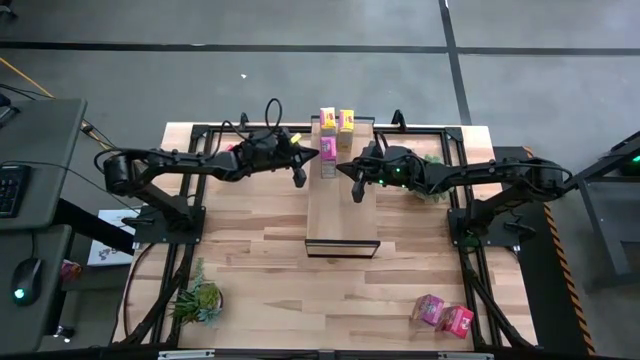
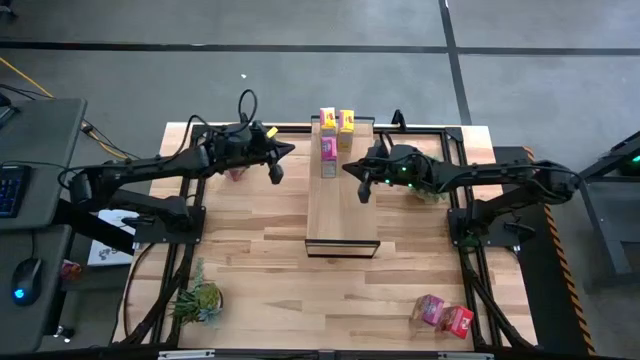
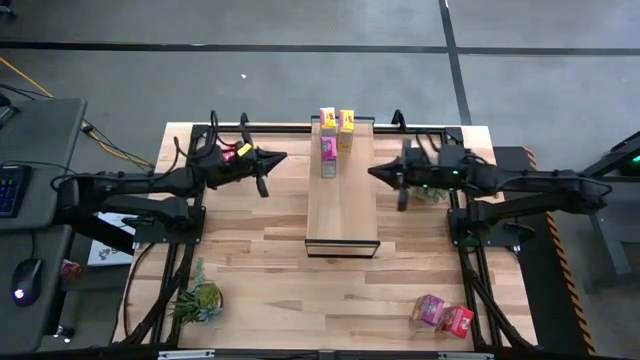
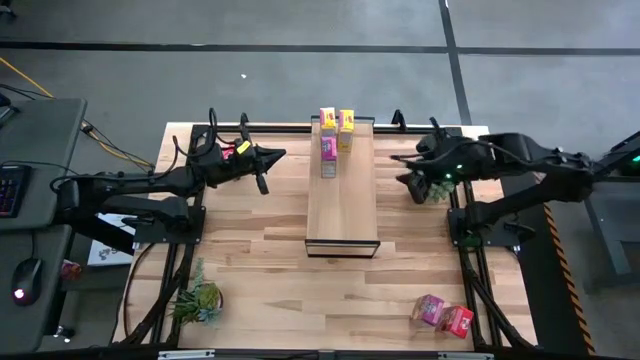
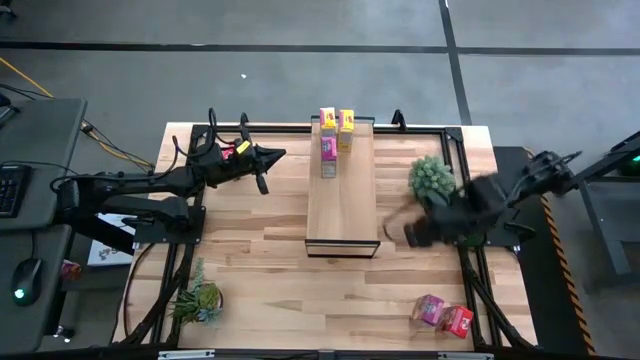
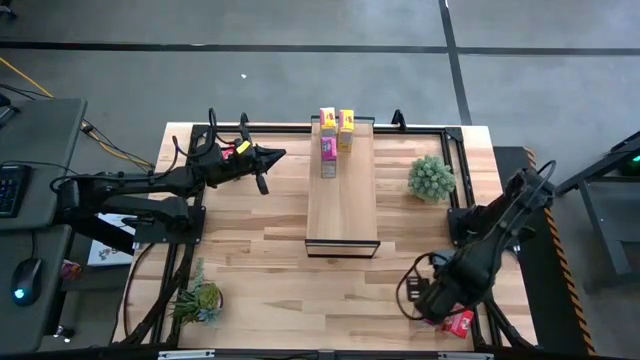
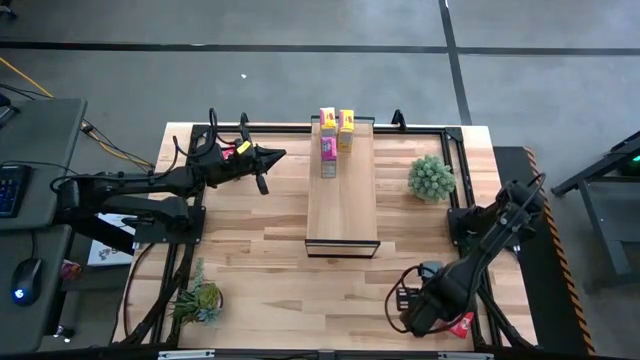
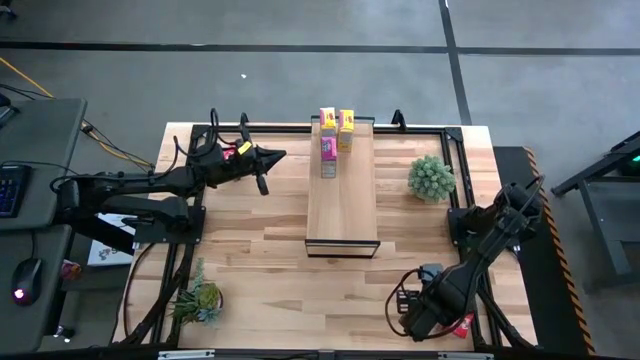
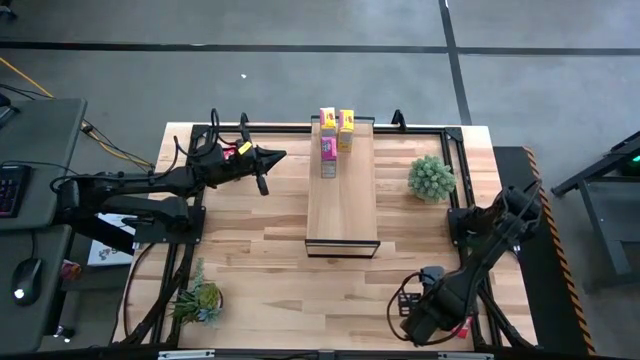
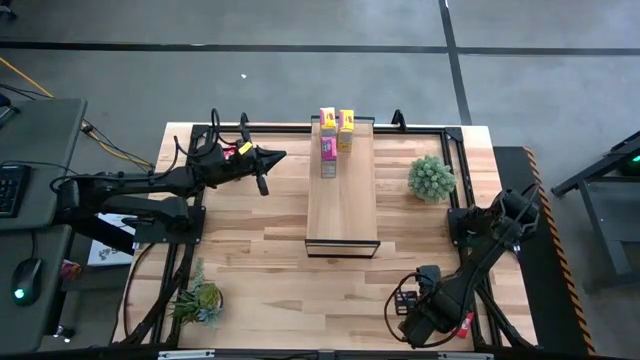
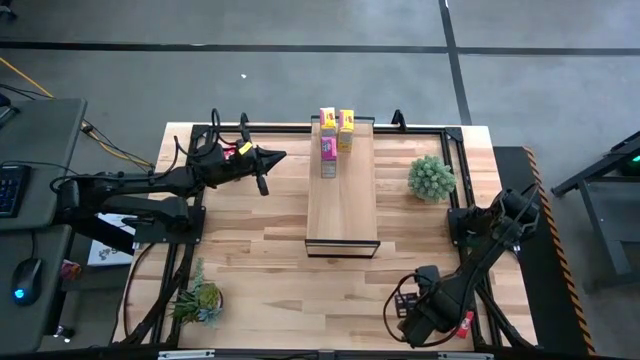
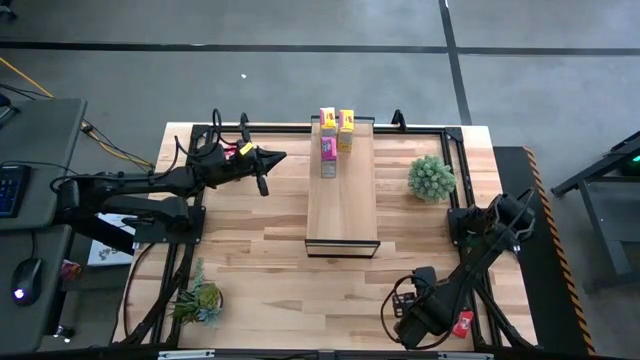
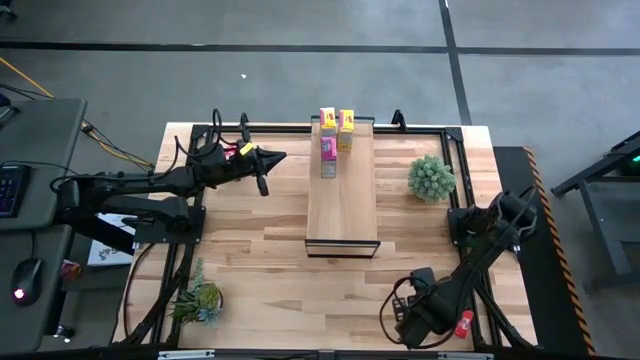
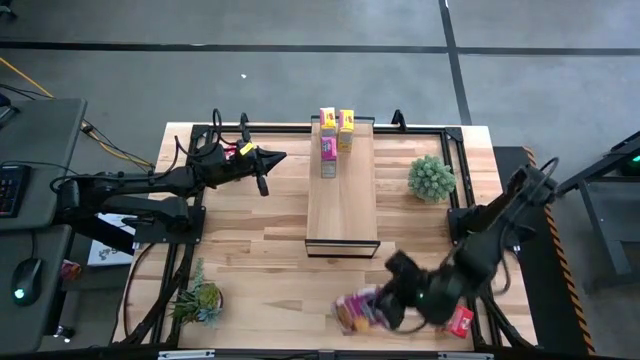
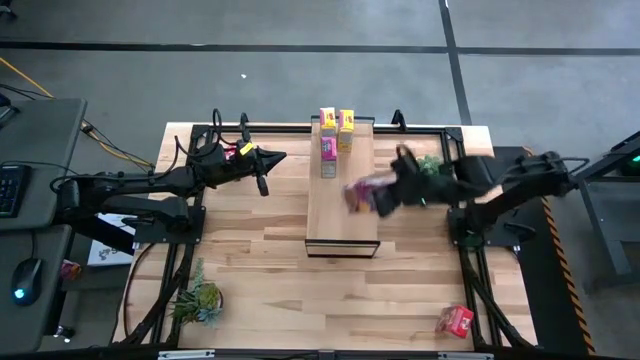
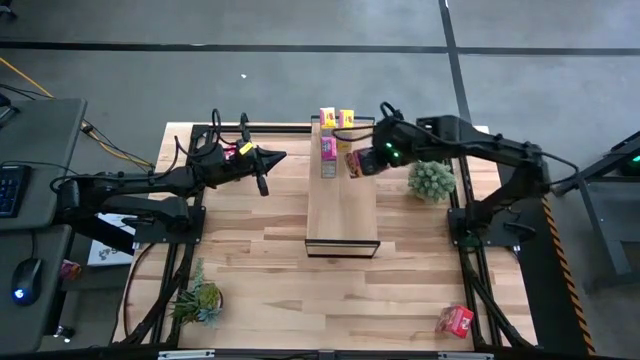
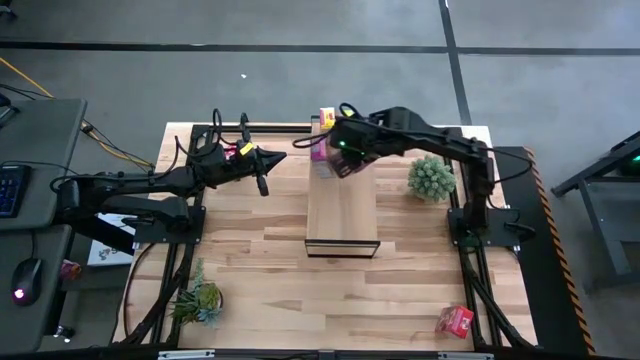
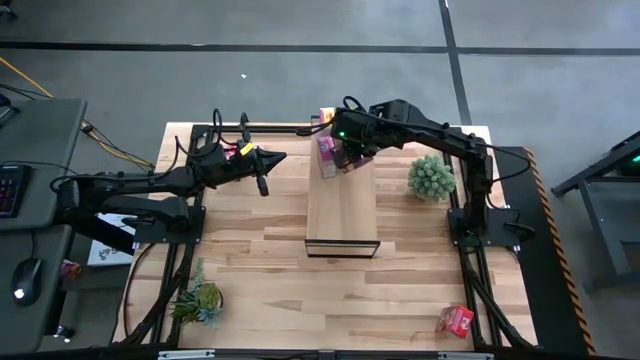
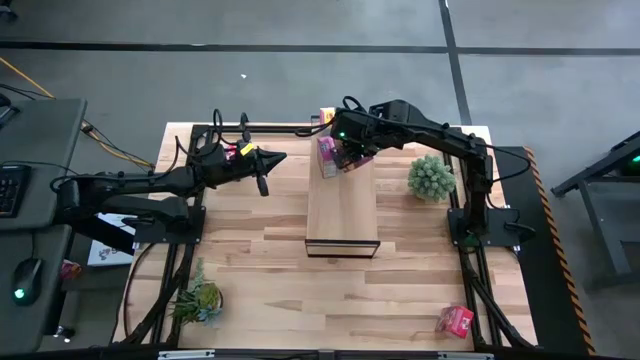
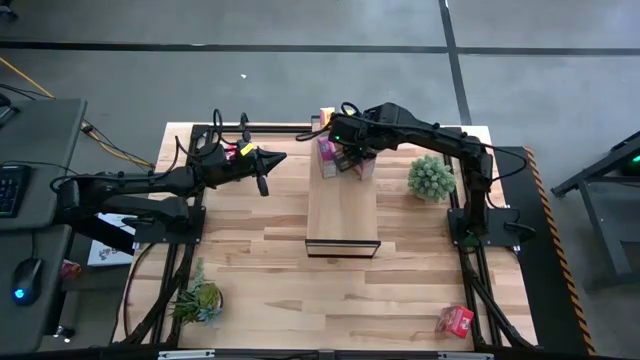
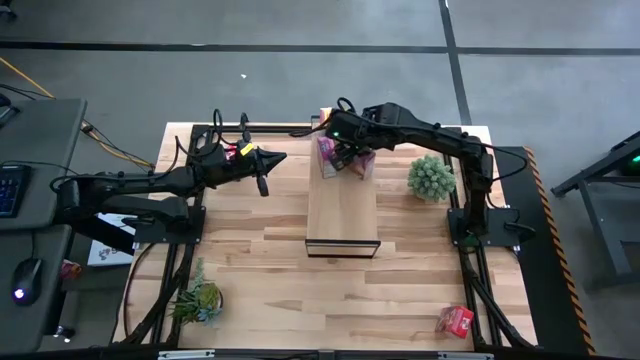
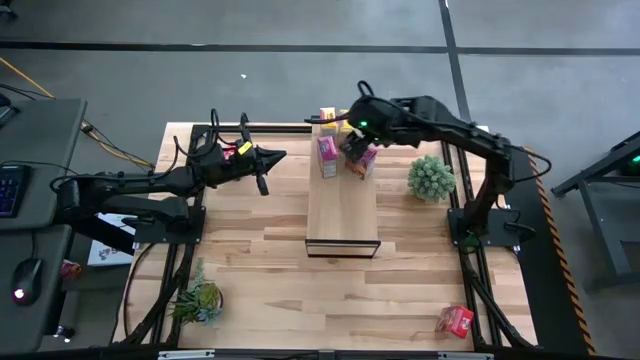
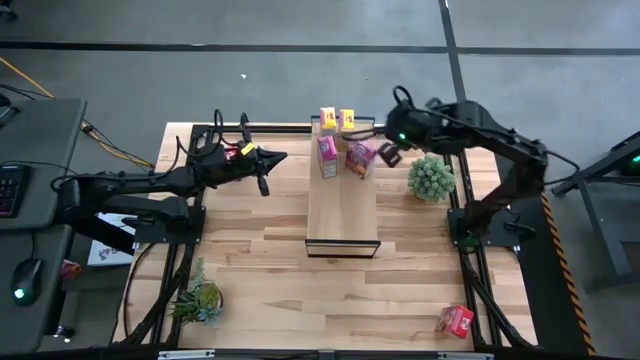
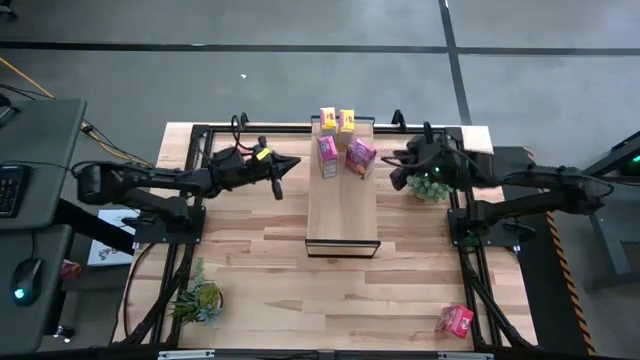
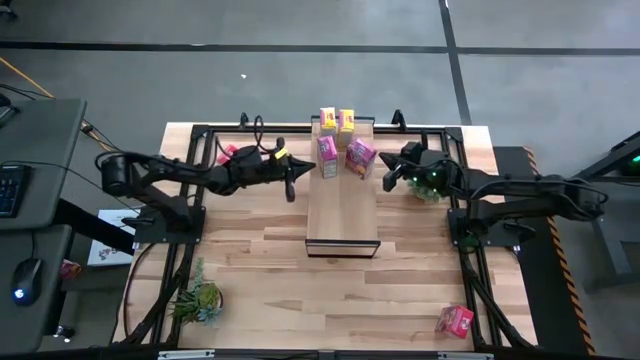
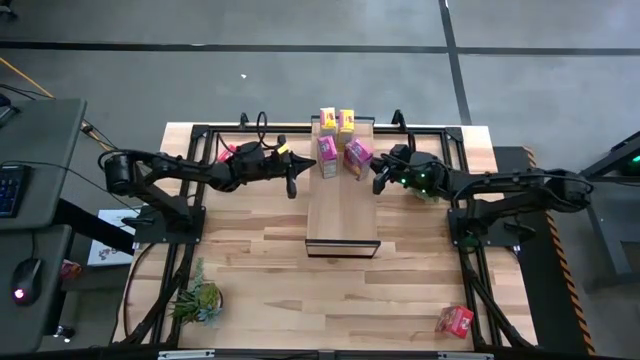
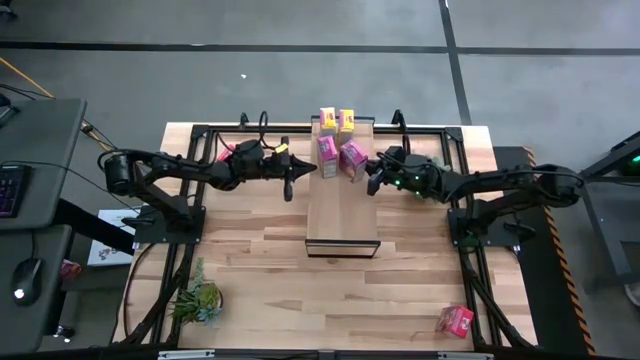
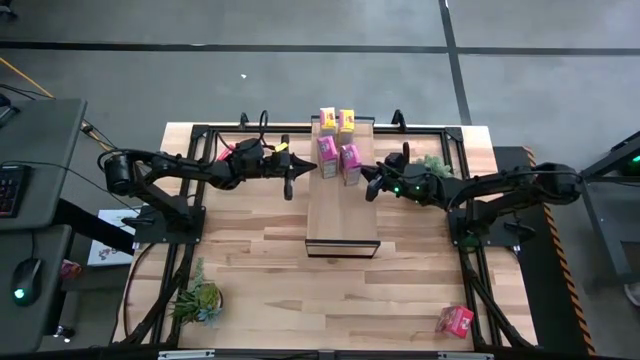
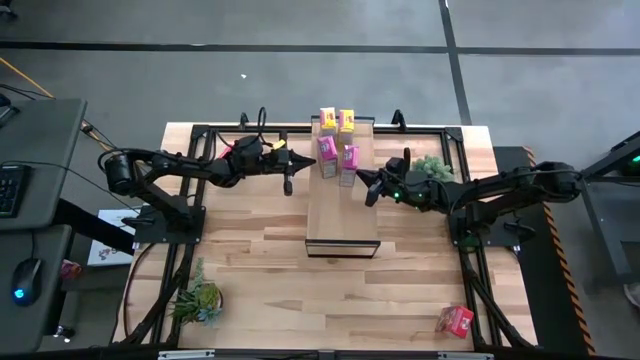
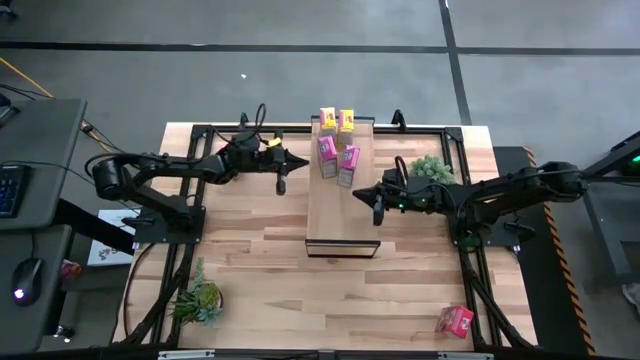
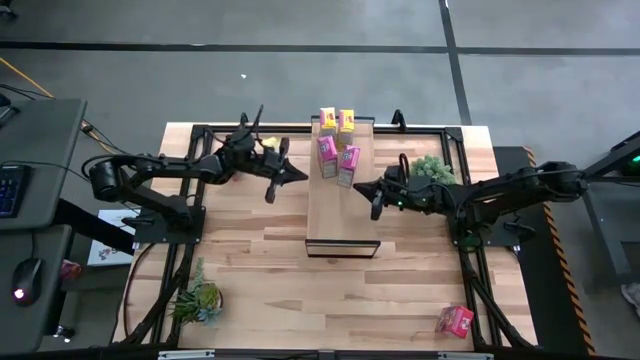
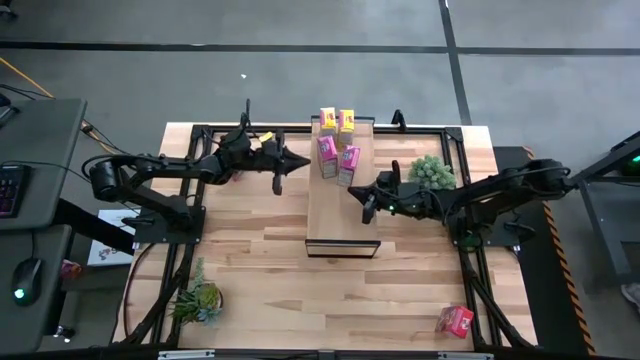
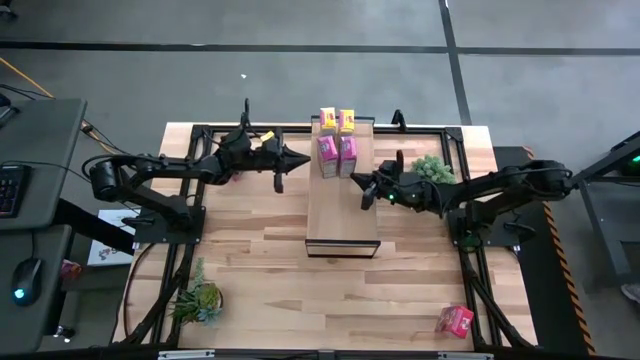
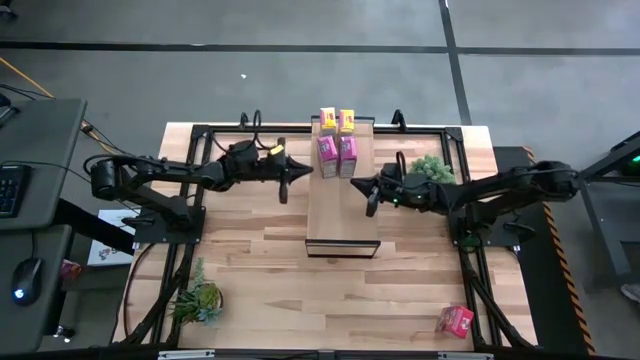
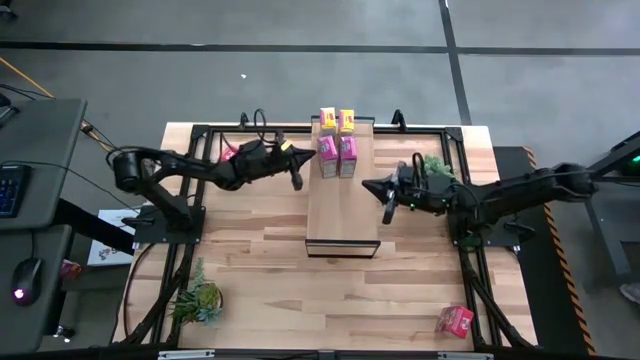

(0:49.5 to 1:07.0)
Task: Stack cereal on shelf
Put the purple cereal box on the shelf

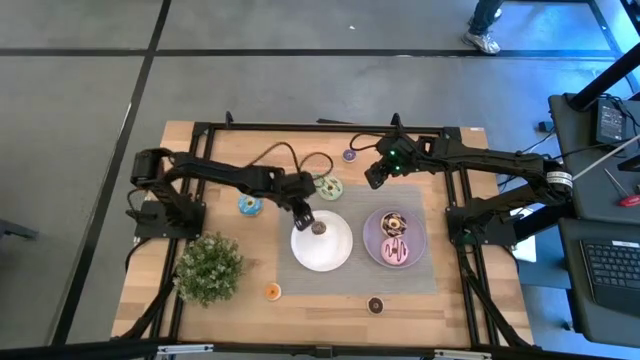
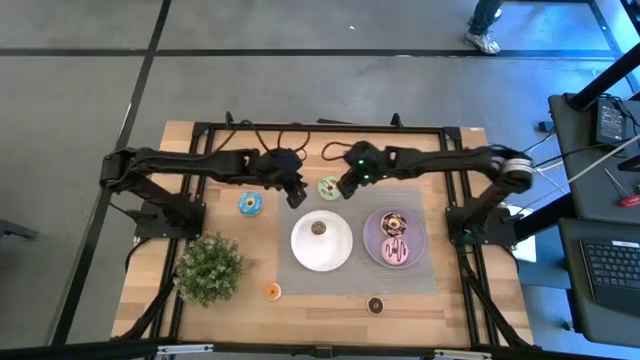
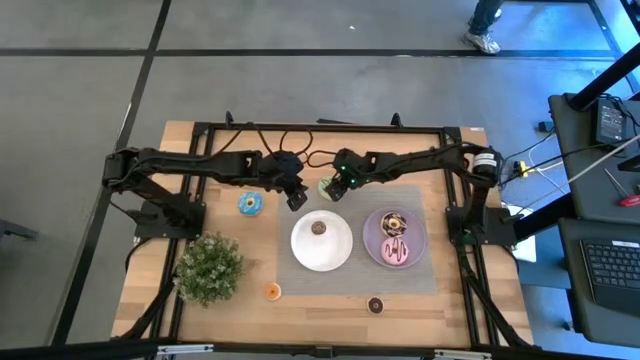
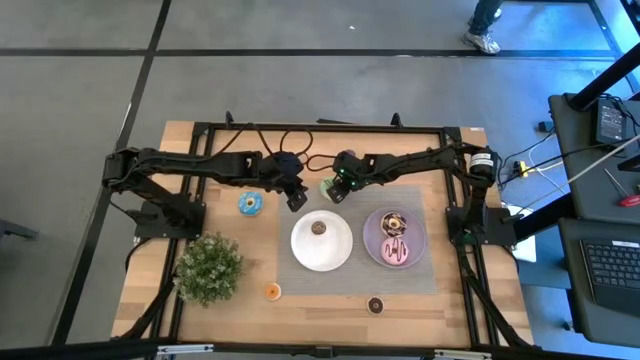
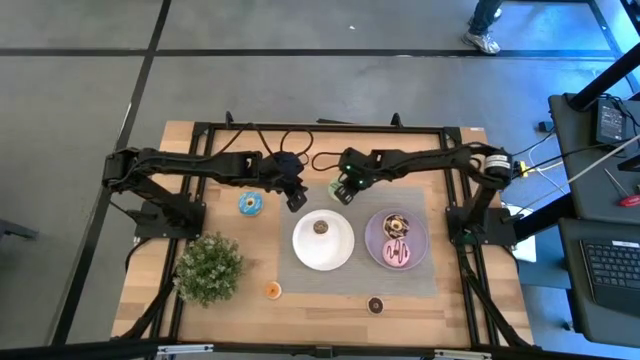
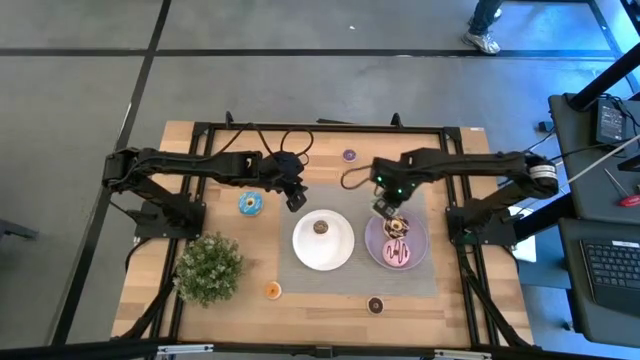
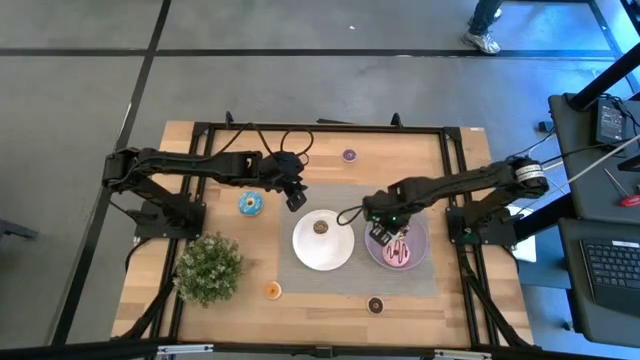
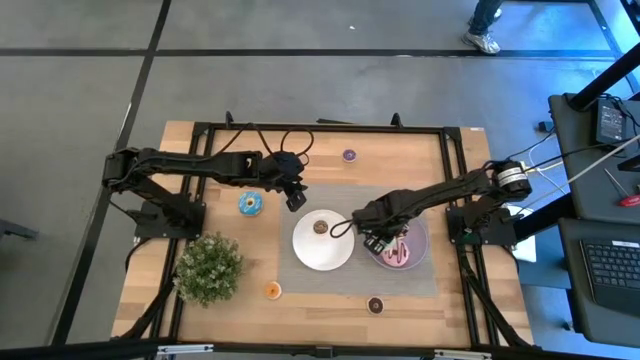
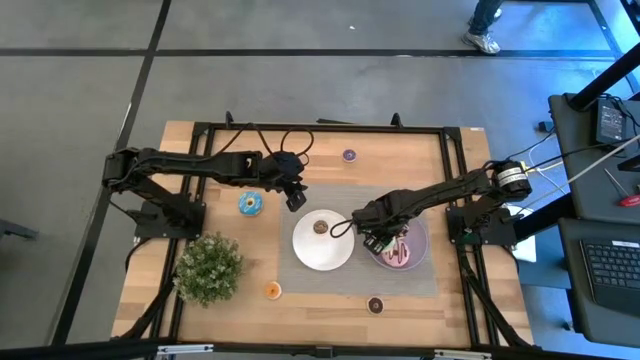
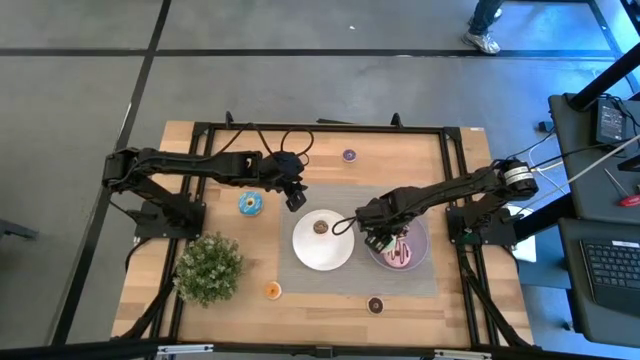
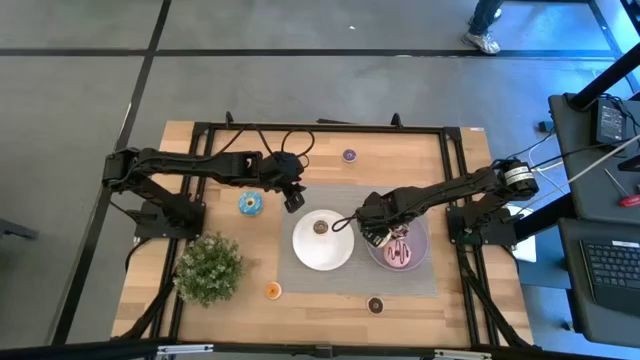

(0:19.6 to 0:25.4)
Task: Pick & Place donuts
Put the large green donut on the purple plate
